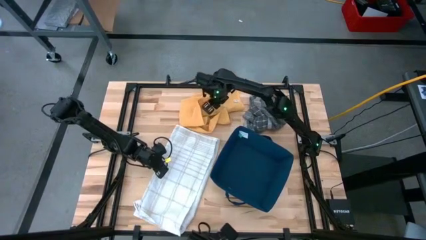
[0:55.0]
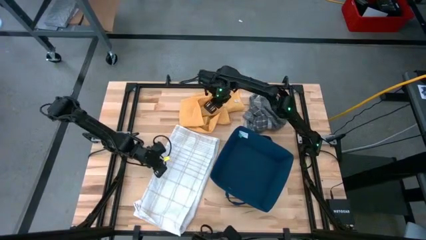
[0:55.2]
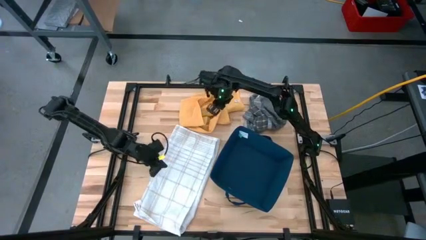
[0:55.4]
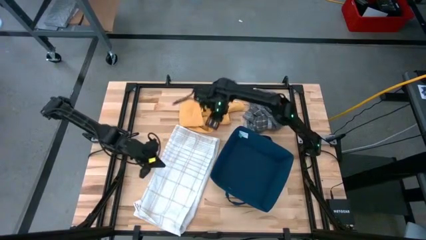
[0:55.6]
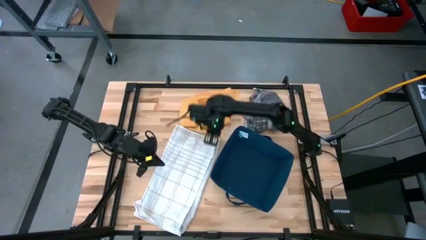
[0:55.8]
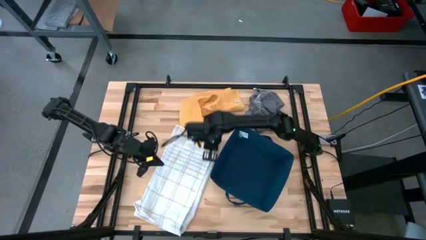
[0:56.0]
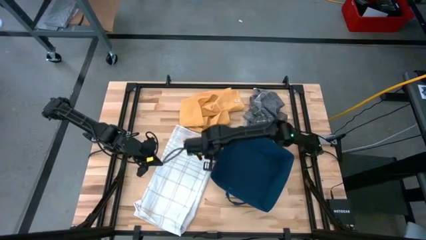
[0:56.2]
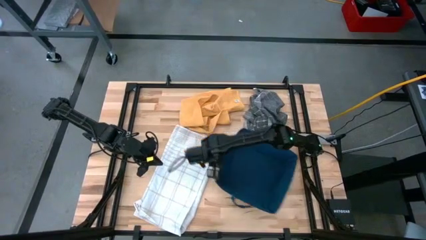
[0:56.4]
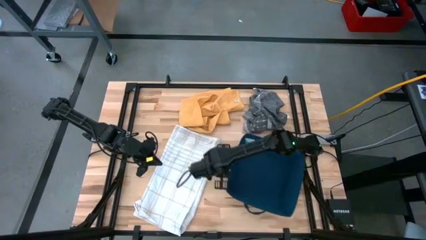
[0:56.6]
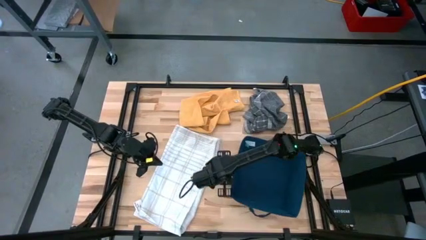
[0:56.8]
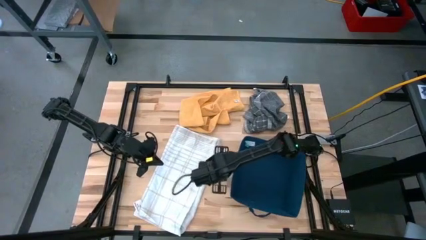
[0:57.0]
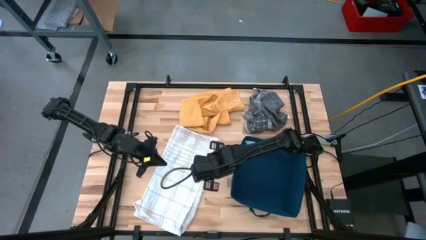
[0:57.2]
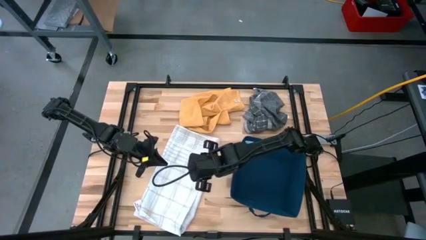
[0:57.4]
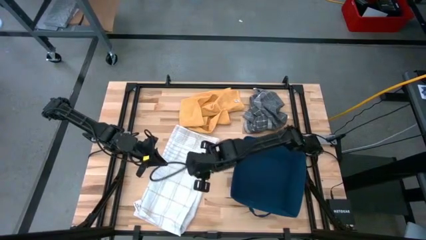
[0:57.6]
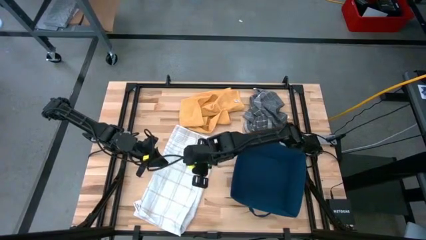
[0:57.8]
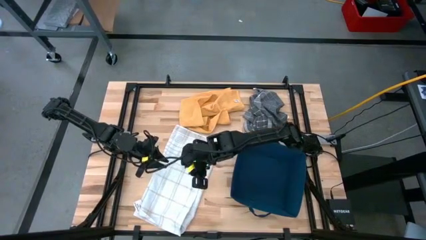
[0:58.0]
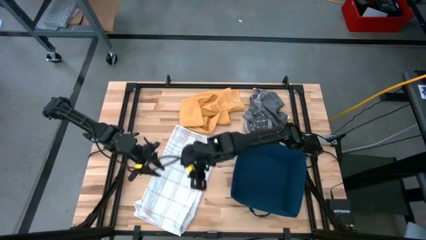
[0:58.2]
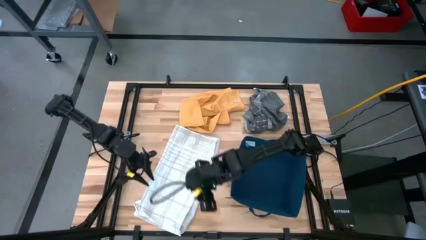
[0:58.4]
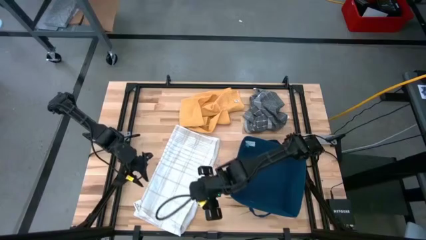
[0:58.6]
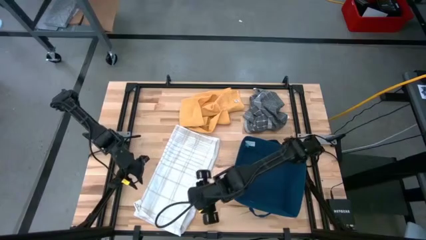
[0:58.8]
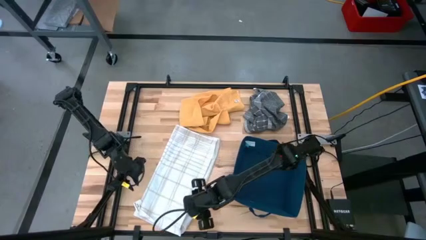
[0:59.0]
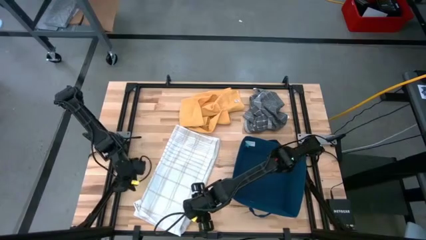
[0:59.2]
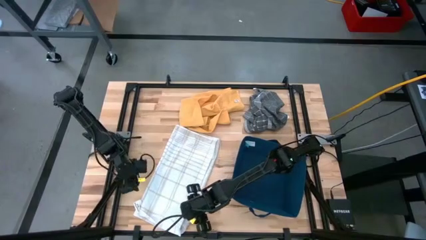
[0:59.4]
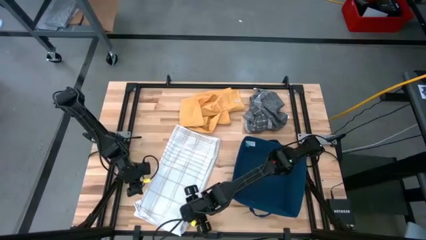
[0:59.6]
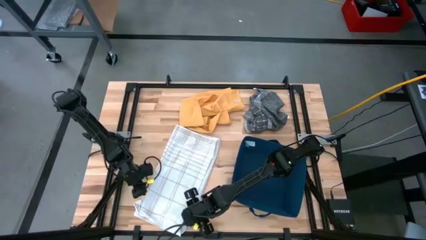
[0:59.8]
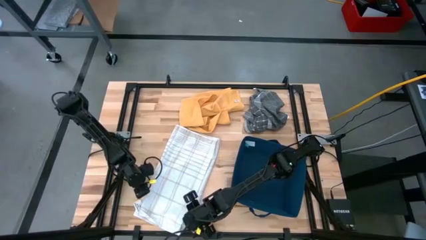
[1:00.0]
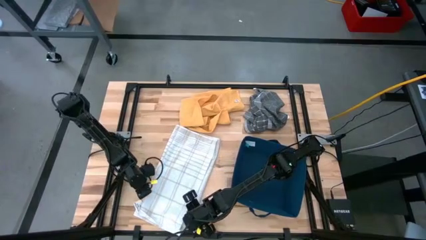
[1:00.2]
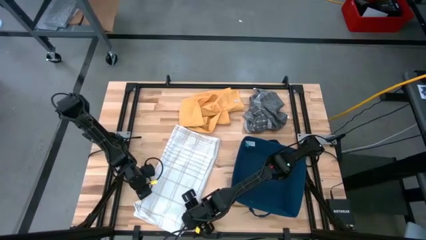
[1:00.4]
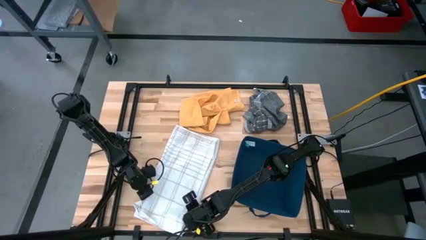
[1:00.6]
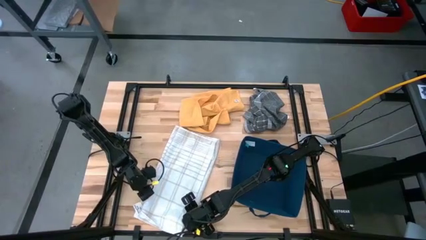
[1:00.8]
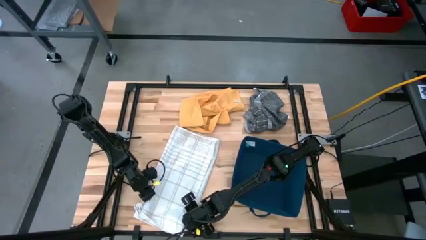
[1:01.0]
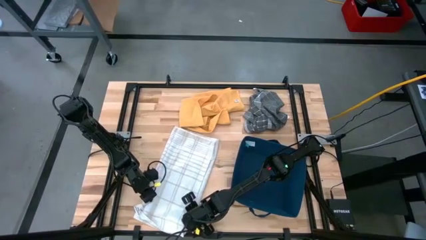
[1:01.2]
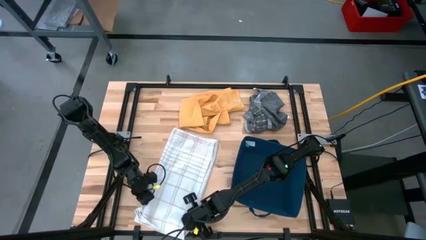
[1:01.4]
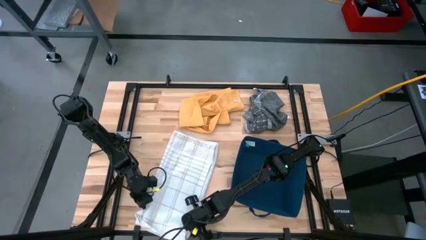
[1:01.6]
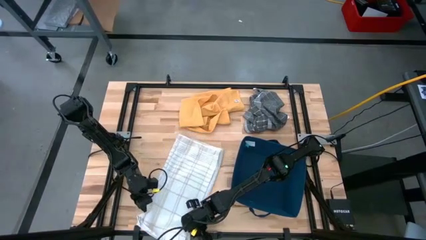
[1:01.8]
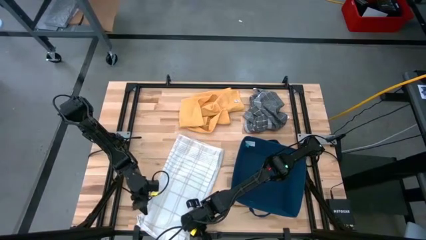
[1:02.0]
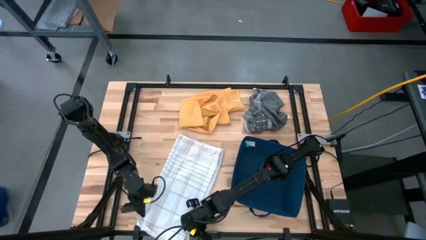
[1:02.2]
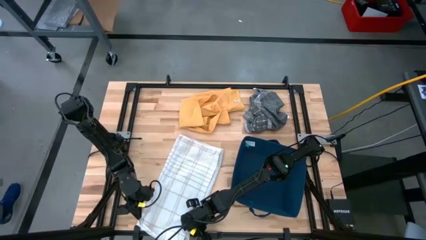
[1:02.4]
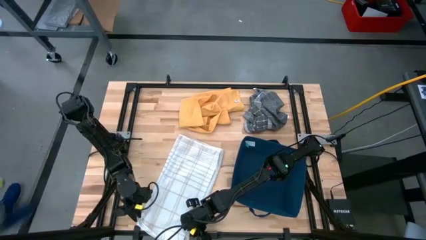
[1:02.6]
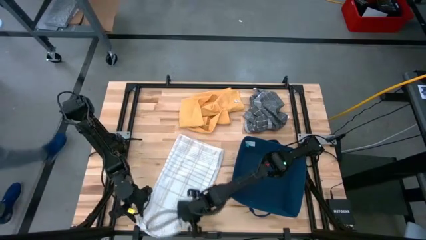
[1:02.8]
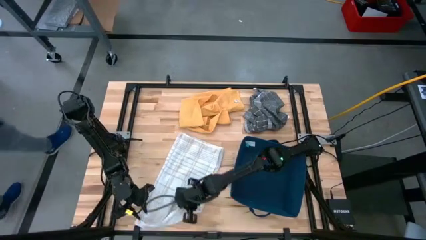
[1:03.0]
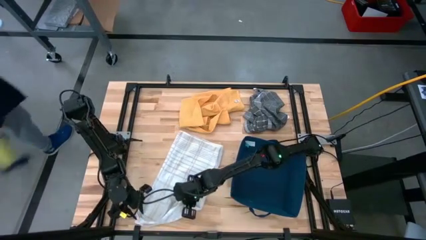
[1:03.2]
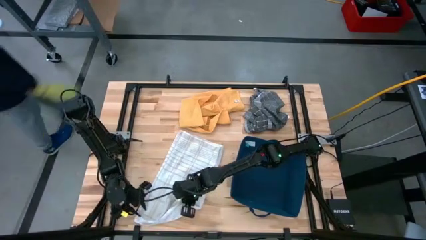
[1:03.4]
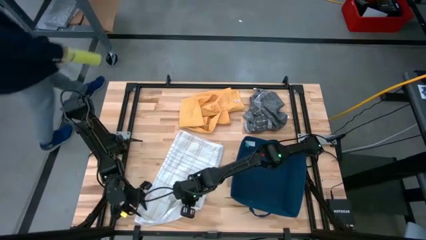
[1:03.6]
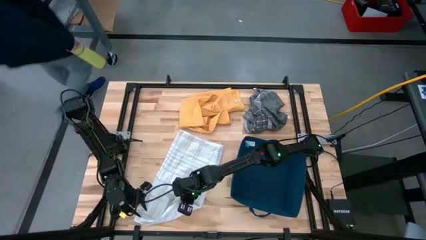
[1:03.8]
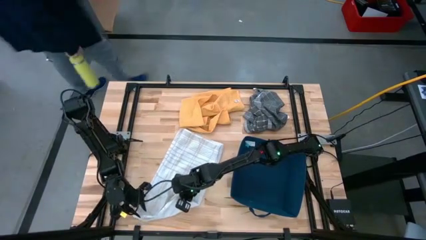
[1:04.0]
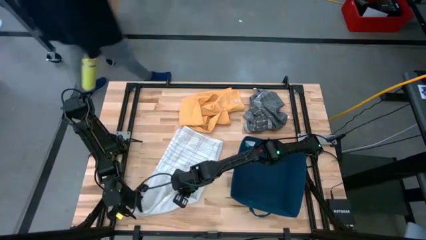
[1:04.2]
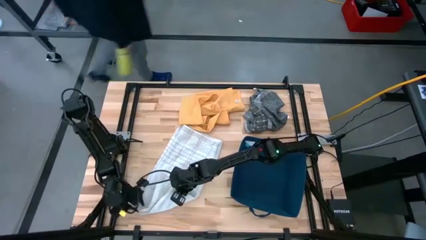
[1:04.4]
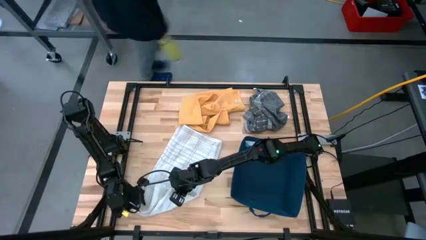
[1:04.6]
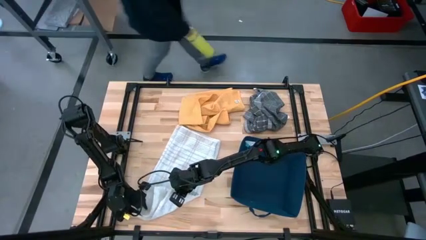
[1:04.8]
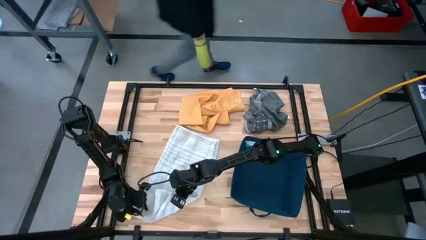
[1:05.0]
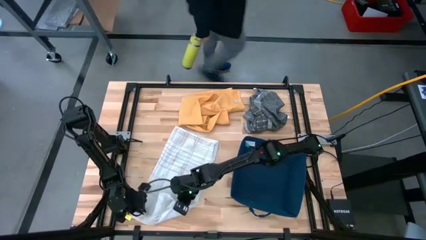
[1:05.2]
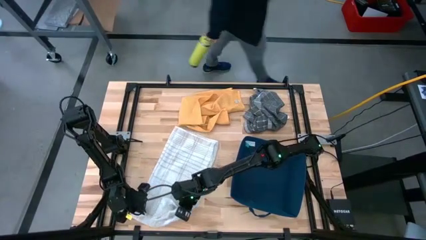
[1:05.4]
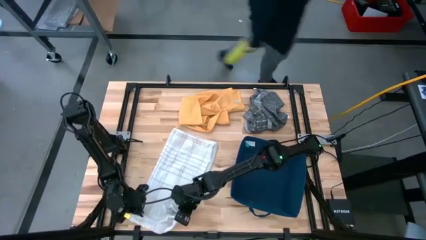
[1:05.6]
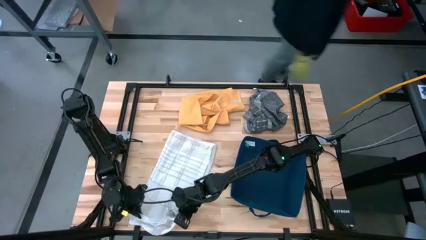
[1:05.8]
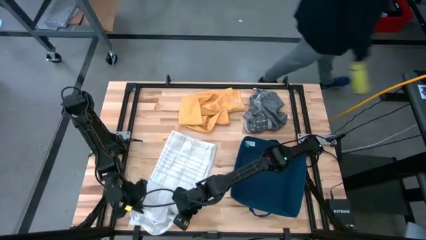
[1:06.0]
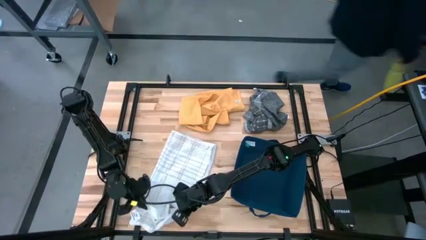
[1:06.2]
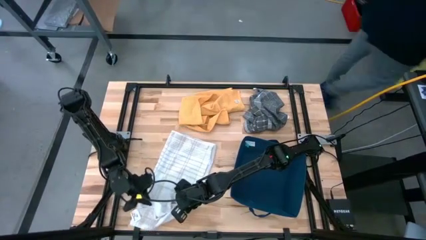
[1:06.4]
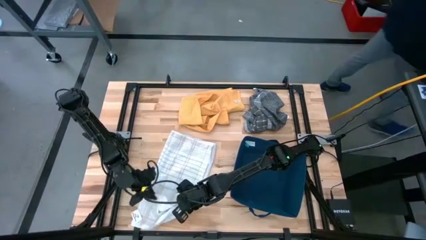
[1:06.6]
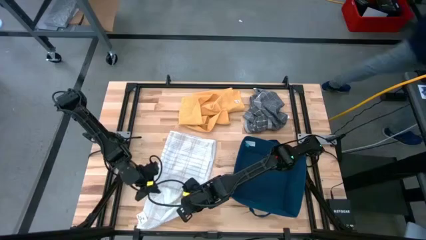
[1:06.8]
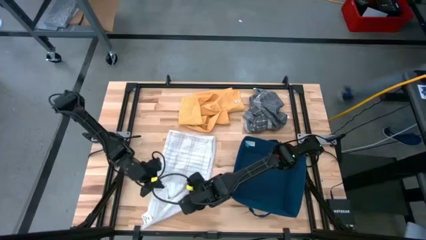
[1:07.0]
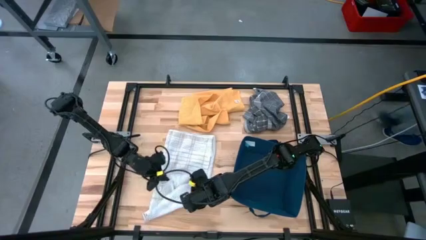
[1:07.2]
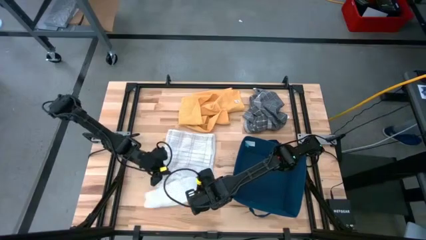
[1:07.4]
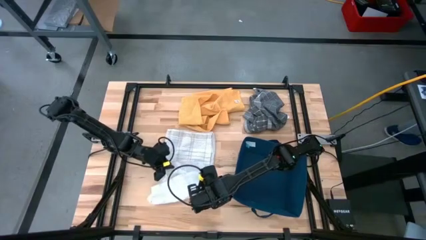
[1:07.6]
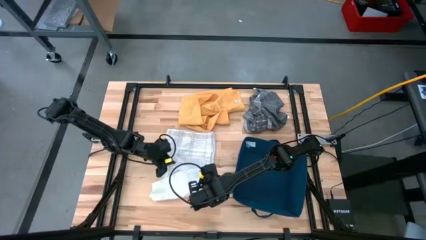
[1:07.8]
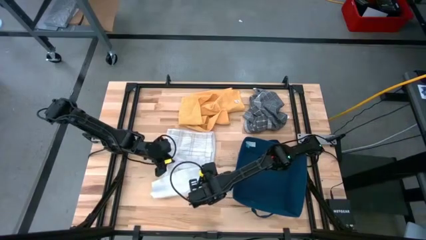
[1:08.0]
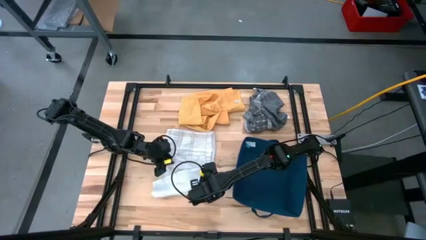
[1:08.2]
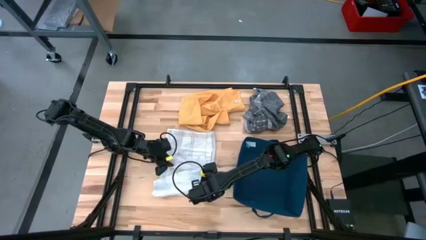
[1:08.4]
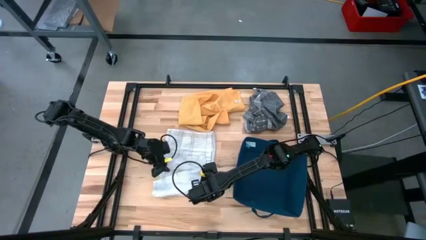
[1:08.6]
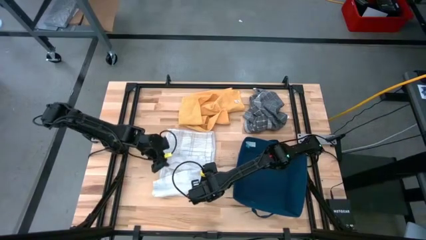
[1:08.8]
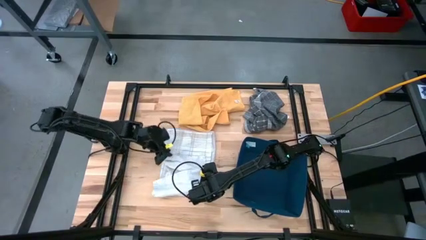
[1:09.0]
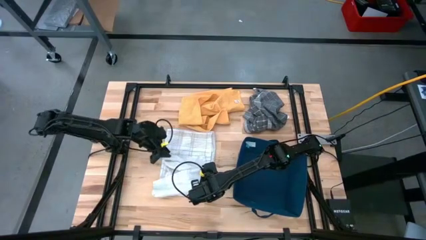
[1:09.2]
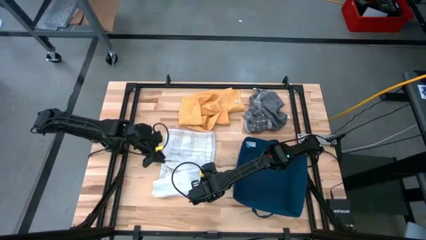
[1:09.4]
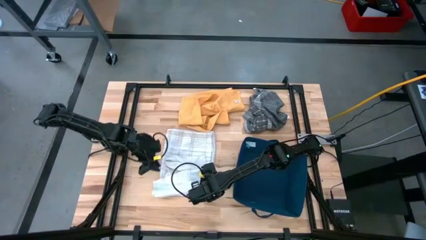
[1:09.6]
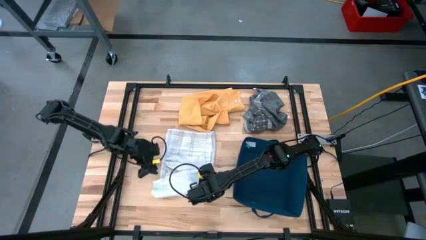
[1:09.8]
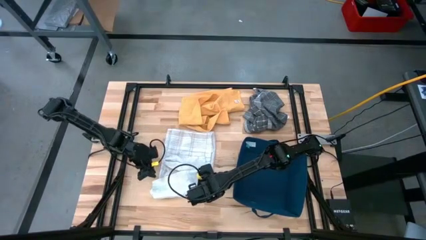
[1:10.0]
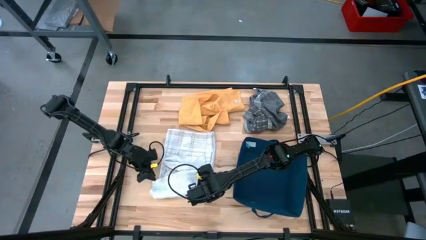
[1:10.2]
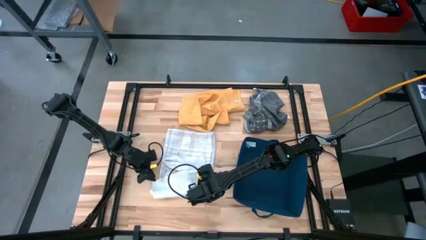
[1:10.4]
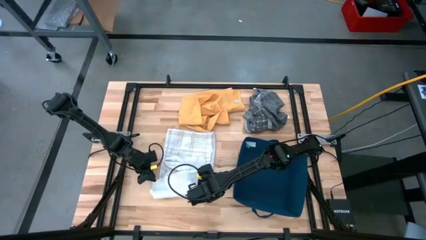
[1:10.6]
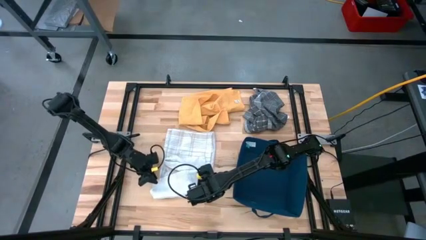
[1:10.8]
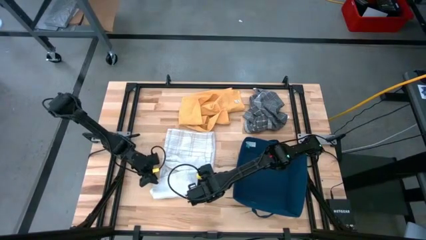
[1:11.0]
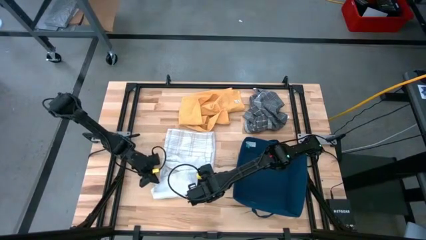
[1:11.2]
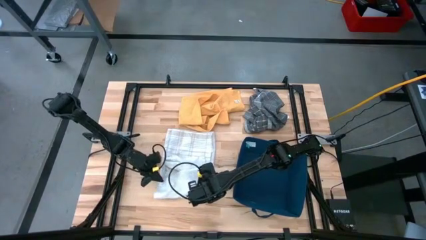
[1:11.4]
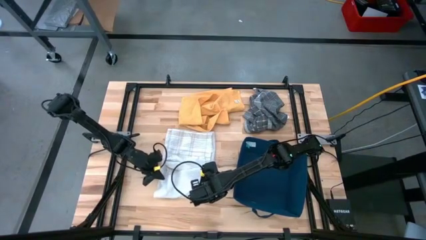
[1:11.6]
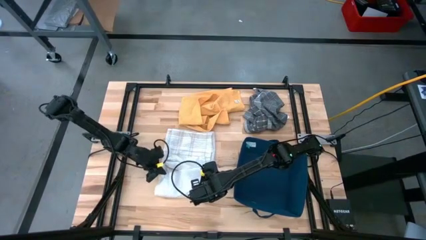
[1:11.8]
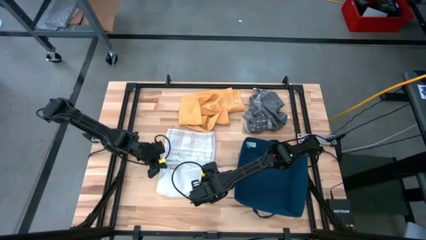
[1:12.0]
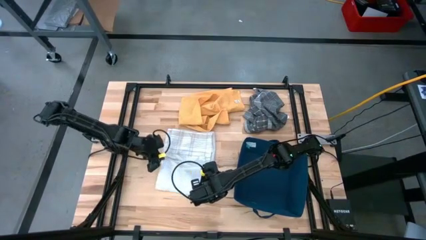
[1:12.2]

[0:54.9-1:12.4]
Task: Fold towel
Fold the white towel
